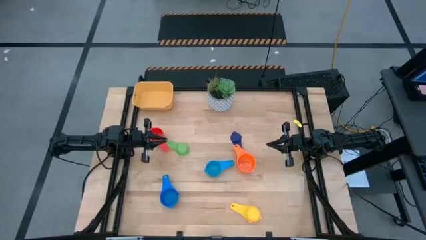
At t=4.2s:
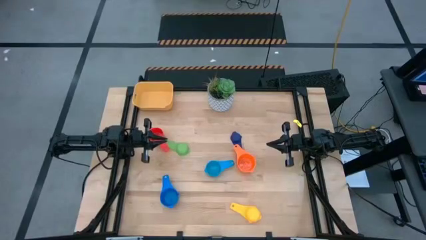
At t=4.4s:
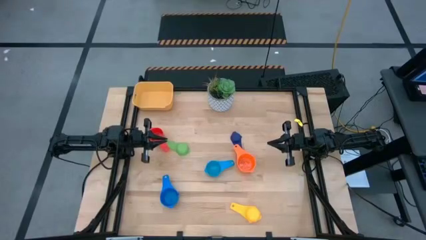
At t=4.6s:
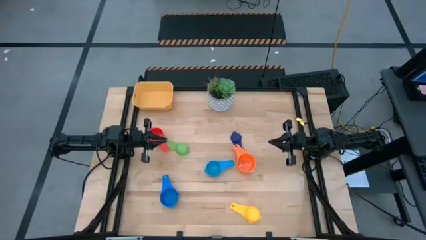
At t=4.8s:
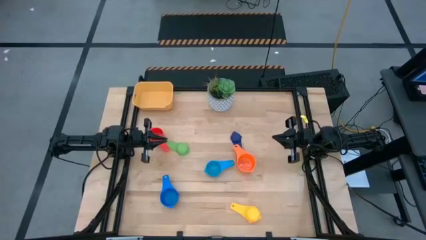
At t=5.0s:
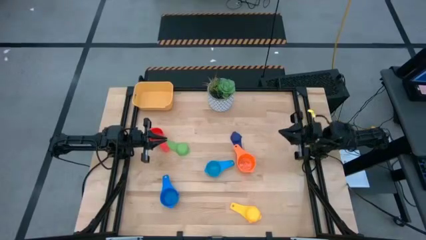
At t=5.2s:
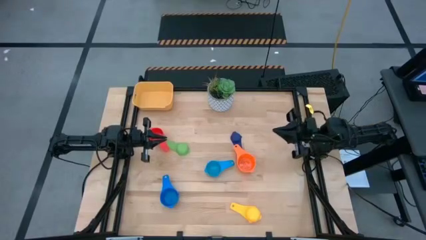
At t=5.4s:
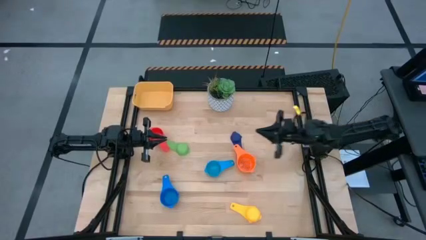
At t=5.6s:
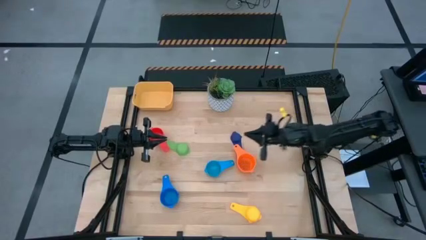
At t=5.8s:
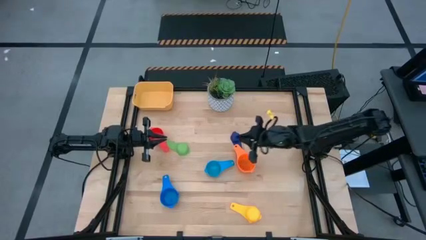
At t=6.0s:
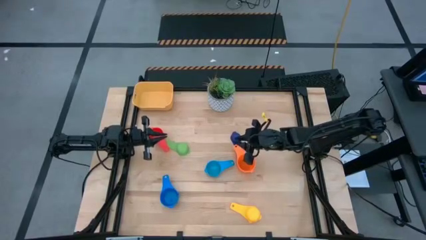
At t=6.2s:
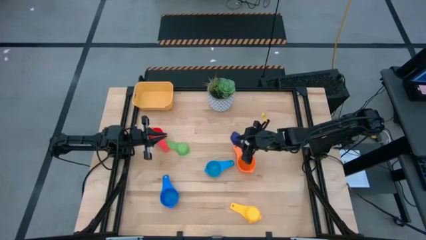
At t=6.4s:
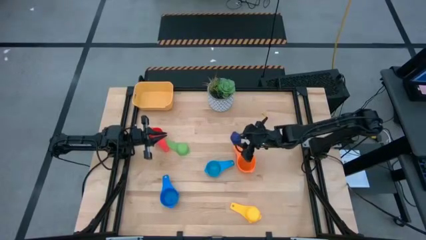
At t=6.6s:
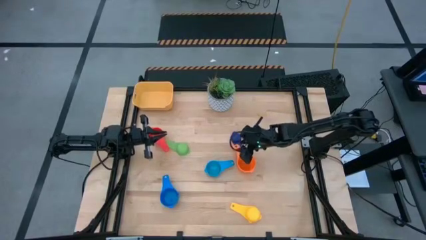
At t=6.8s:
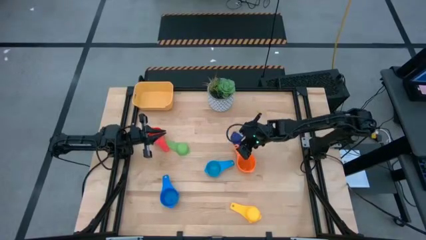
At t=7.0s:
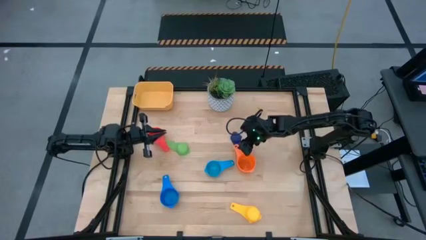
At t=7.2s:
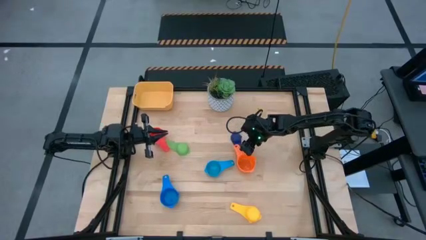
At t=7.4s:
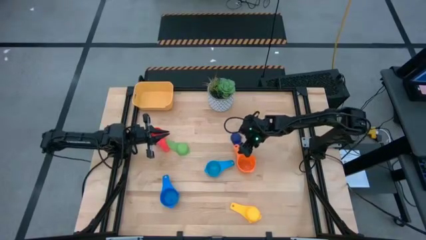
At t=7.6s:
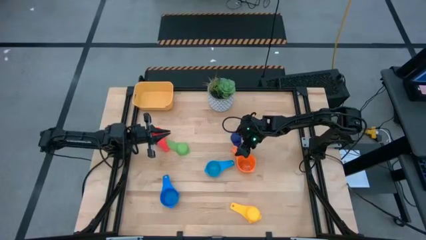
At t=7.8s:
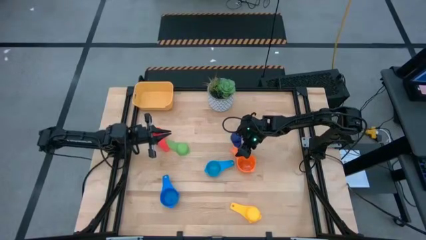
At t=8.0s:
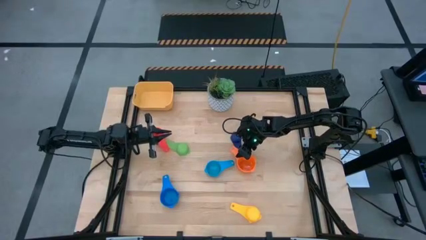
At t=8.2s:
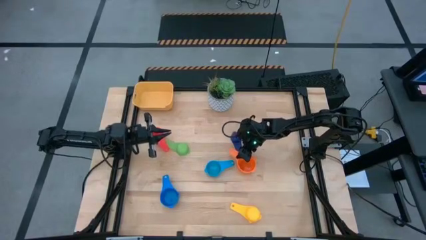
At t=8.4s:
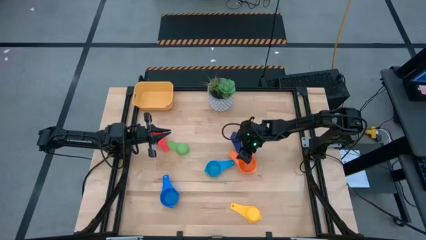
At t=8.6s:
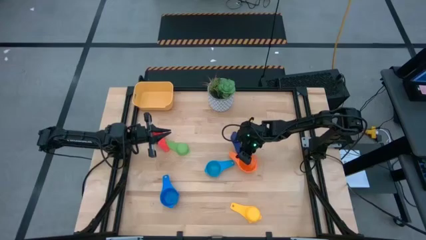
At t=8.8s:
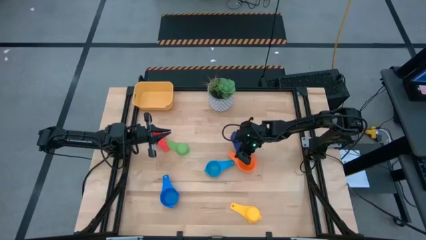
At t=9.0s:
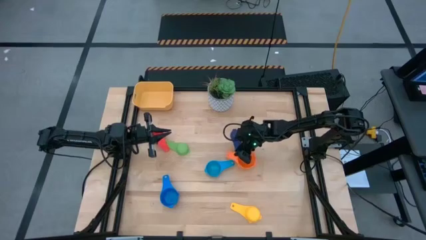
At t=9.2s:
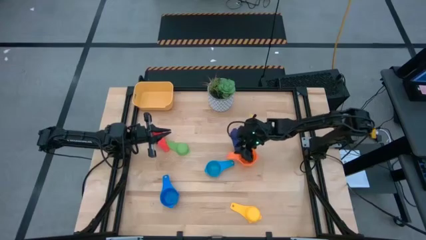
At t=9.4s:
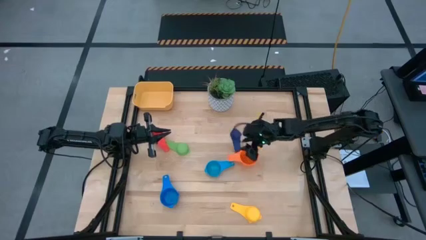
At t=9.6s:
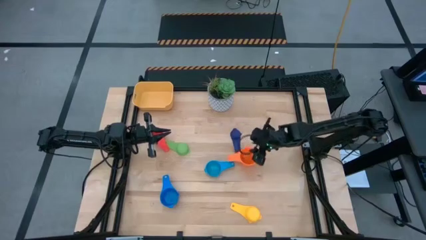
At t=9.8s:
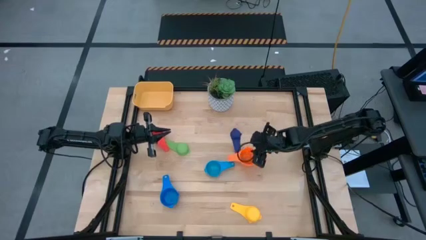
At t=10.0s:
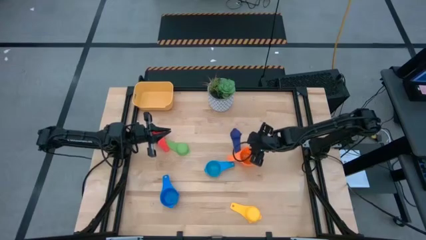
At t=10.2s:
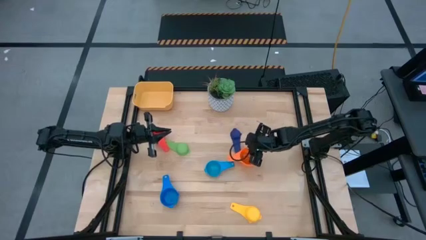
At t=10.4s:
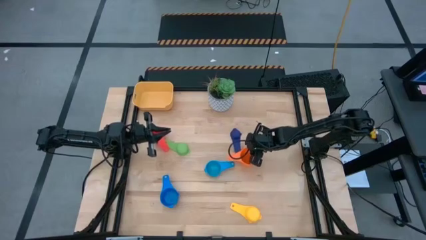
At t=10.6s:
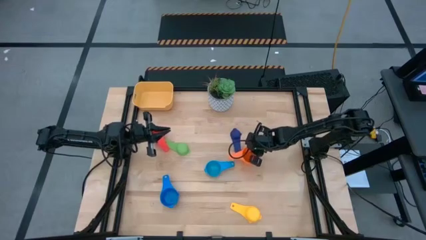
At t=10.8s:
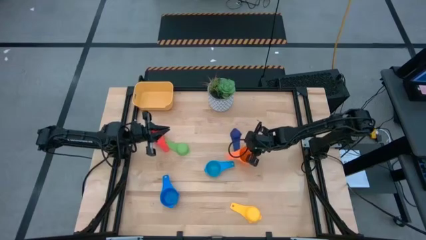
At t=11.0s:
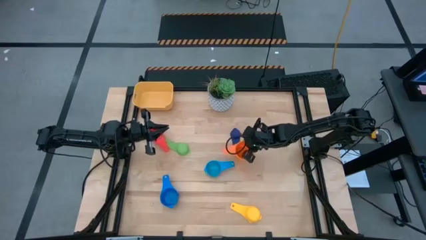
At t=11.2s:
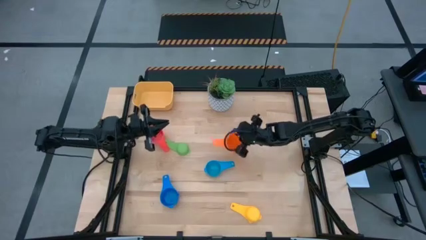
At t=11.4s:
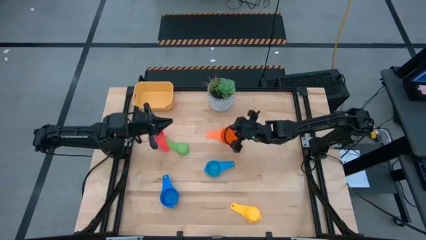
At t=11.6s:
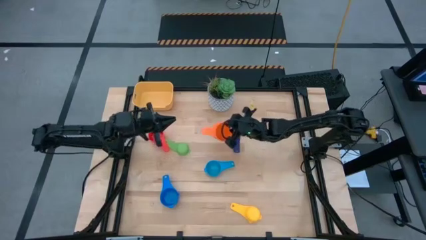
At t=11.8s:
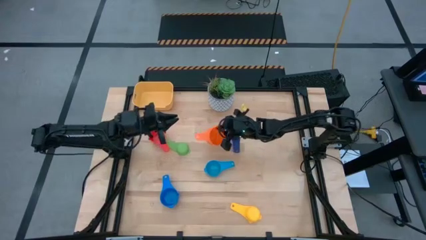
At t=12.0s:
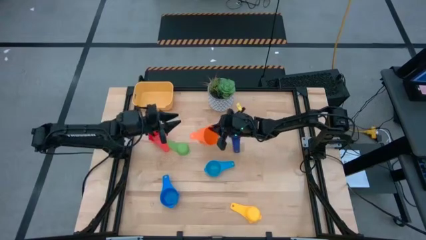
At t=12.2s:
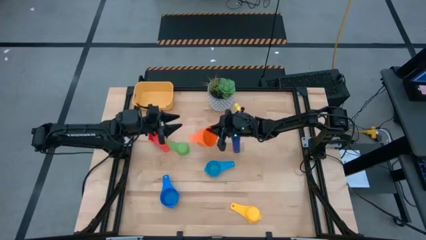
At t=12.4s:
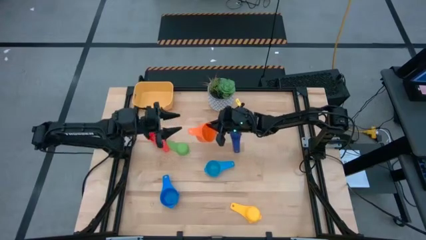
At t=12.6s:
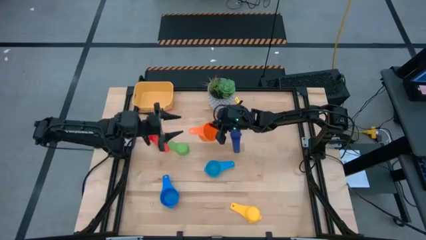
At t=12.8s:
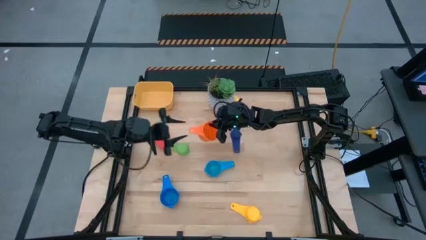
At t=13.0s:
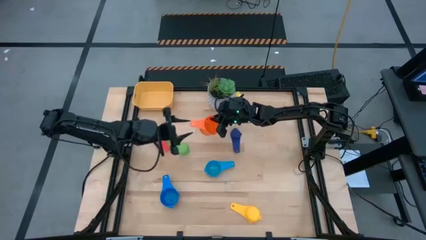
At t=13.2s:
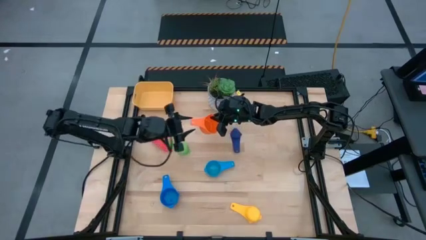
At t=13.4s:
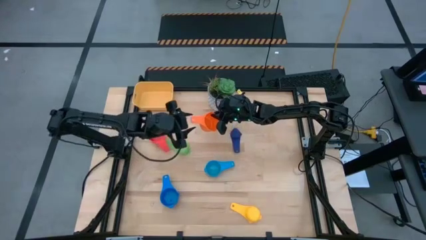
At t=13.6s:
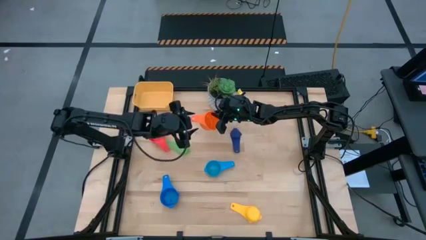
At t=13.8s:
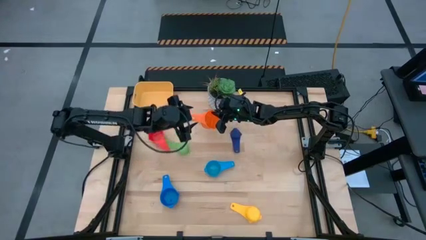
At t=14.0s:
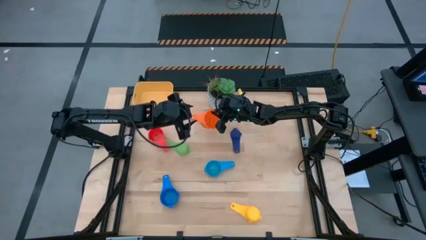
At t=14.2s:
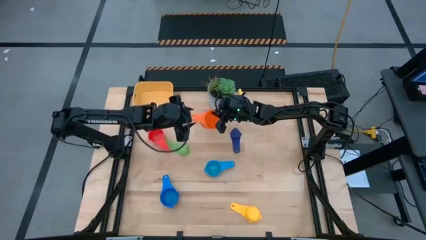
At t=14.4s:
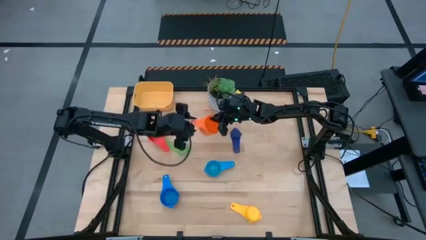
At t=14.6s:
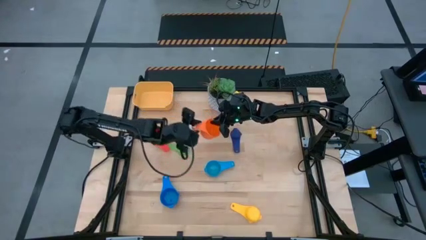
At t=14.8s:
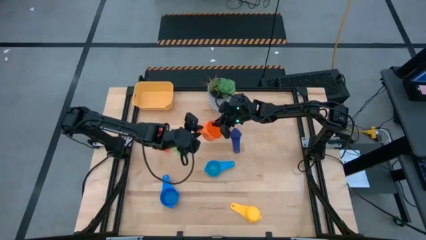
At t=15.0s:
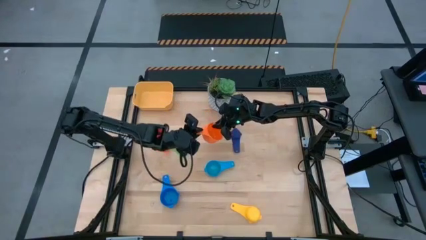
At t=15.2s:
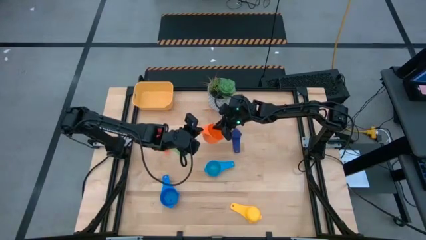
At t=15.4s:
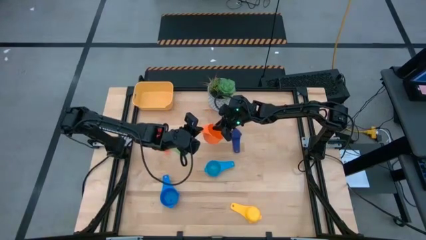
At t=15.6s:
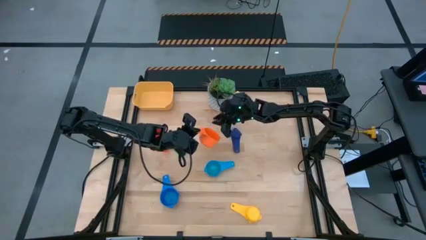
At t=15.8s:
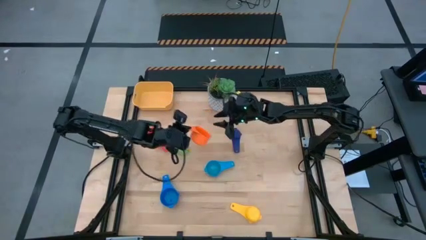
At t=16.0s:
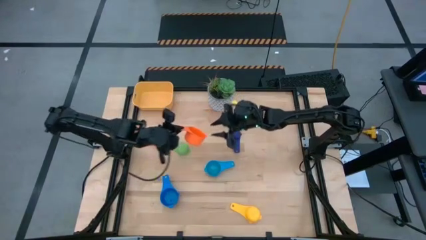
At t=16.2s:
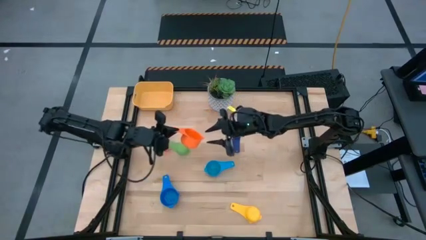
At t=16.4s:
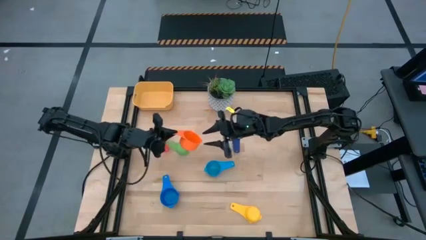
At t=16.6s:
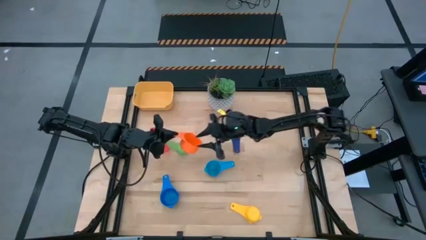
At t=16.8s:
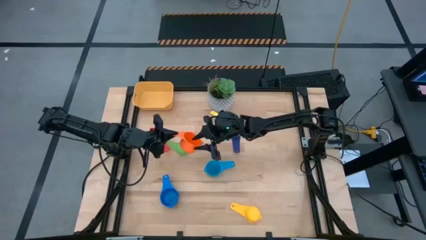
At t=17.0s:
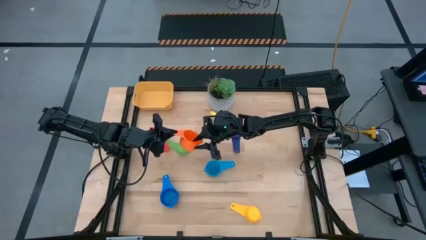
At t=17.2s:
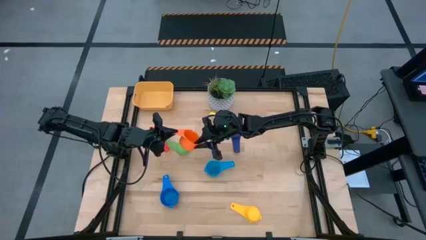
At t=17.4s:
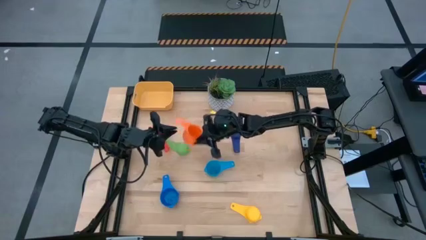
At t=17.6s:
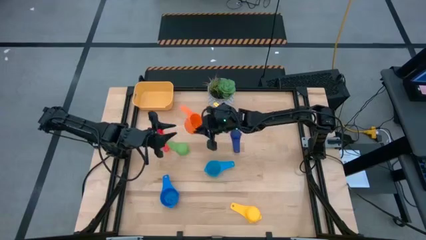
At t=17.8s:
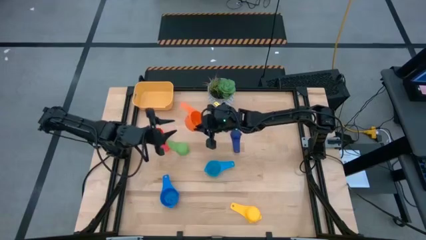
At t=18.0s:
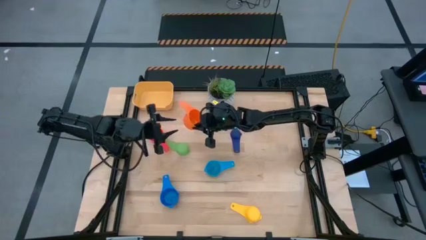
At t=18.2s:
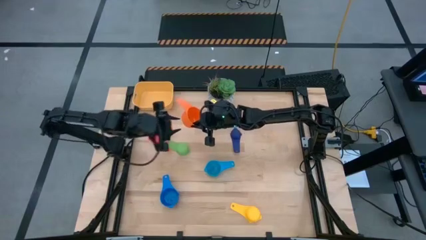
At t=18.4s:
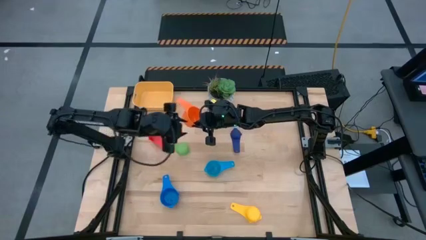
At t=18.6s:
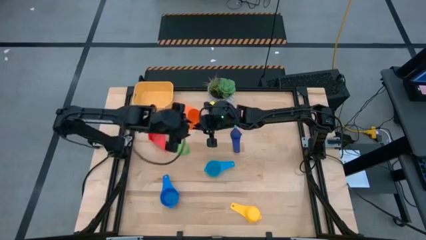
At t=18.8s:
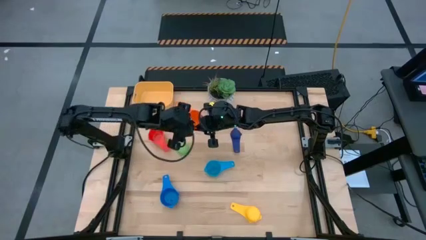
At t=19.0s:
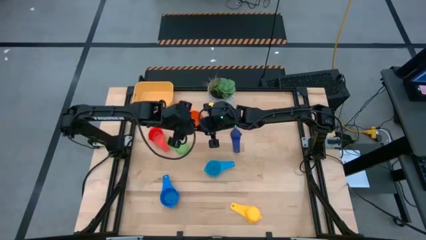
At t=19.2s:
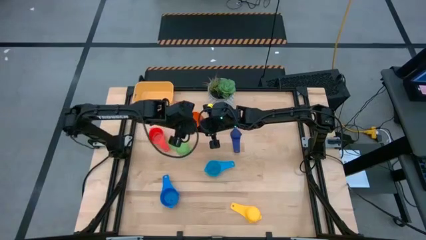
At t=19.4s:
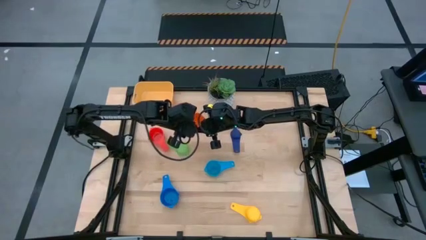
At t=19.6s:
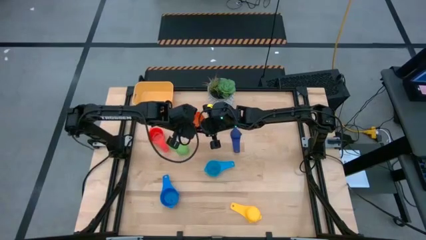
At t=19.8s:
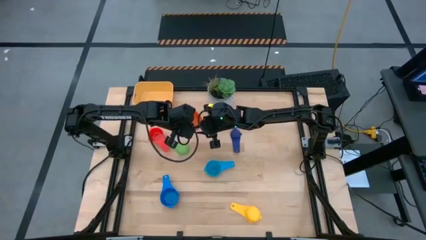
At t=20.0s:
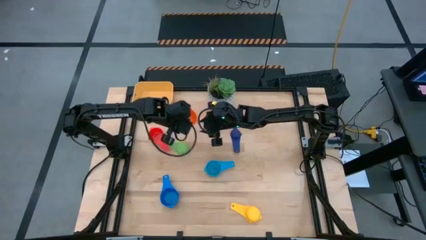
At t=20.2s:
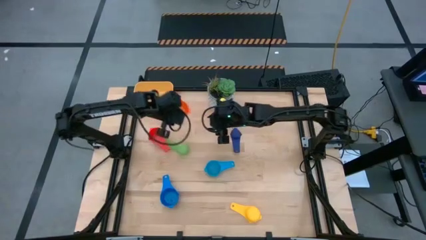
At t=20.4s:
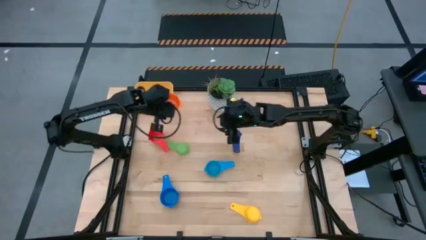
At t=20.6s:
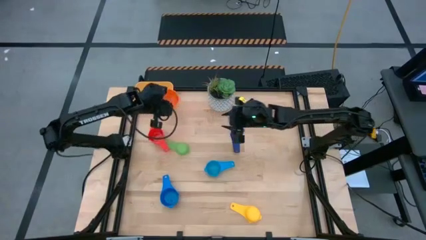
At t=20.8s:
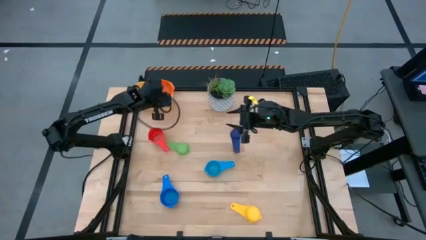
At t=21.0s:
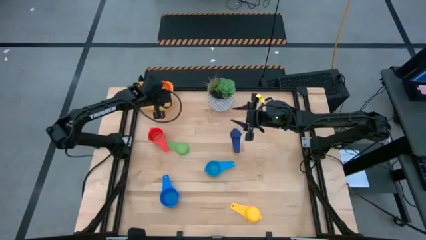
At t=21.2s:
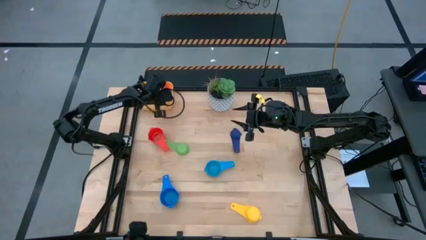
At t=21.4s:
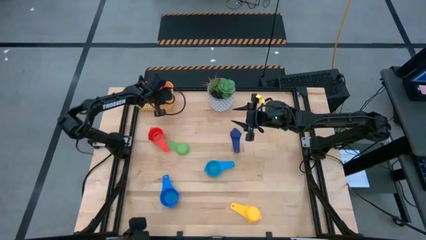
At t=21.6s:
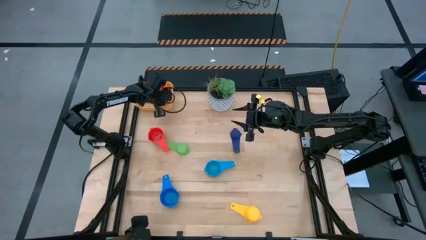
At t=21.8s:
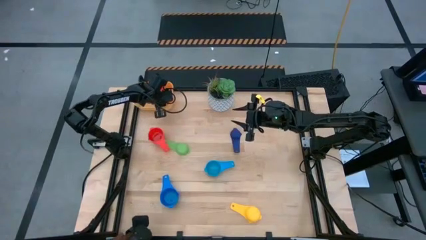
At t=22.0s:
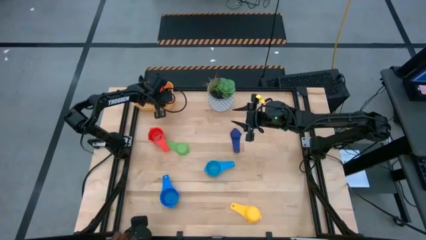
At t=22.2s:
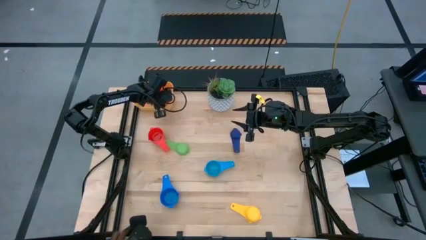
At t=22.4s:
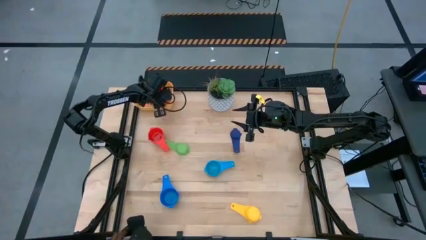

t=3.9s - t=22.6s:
Task: Nest measuring cups in basket
Put the light orange measuring cup into the yellow bin
